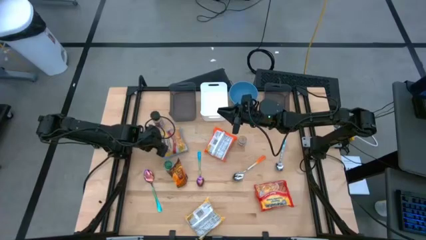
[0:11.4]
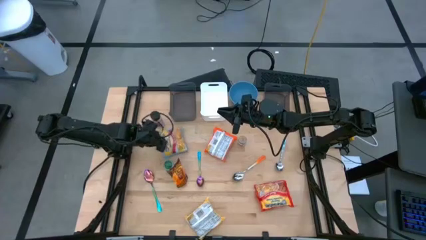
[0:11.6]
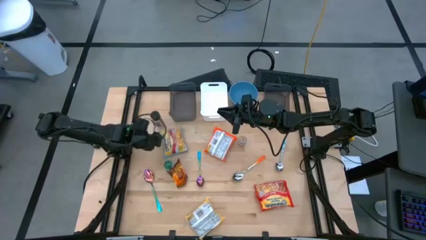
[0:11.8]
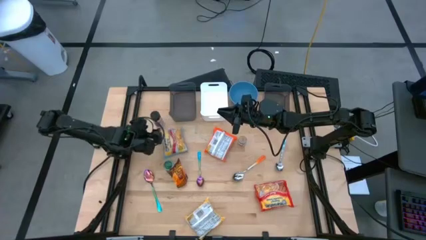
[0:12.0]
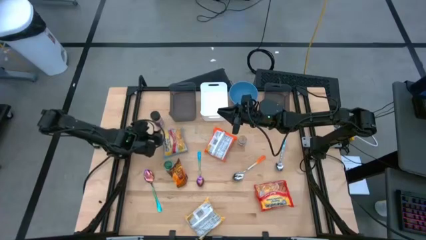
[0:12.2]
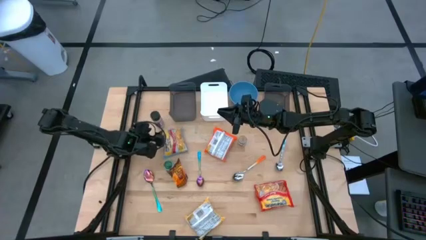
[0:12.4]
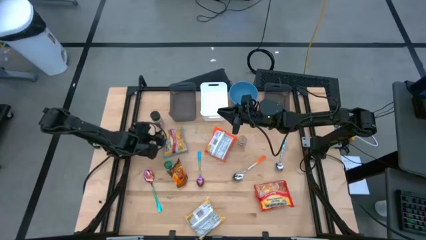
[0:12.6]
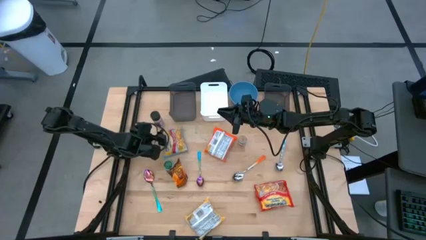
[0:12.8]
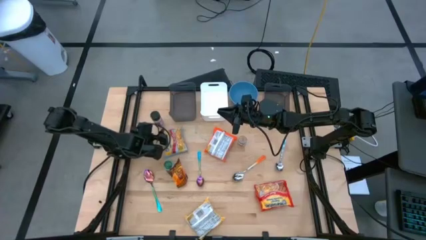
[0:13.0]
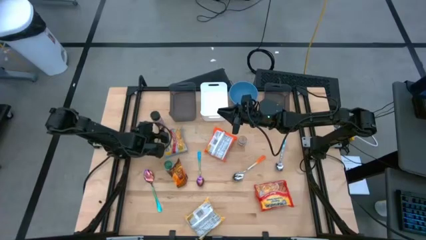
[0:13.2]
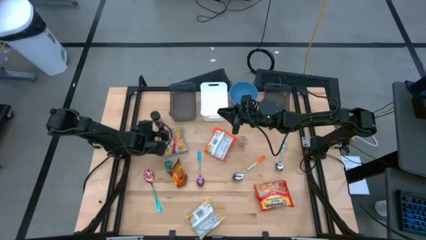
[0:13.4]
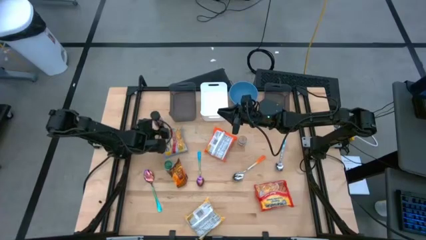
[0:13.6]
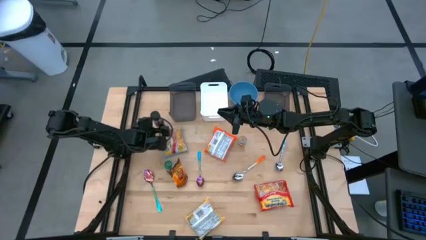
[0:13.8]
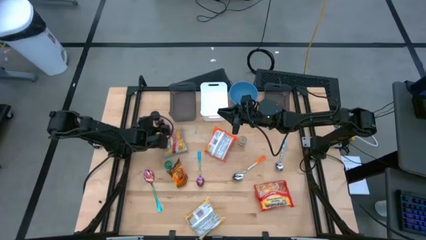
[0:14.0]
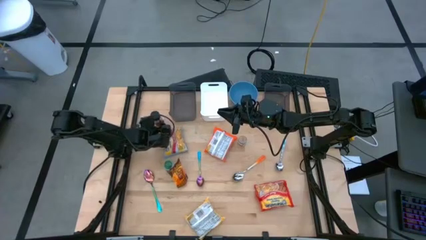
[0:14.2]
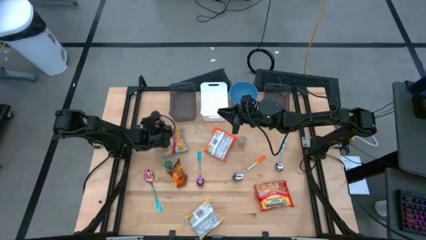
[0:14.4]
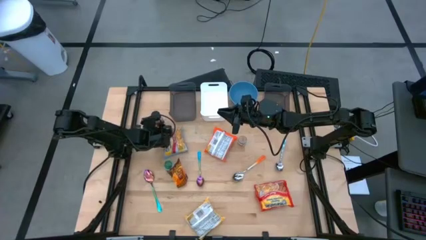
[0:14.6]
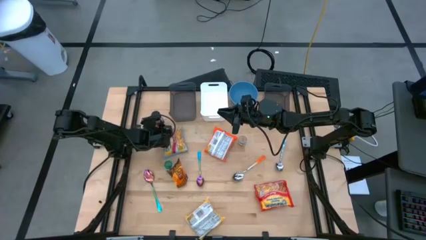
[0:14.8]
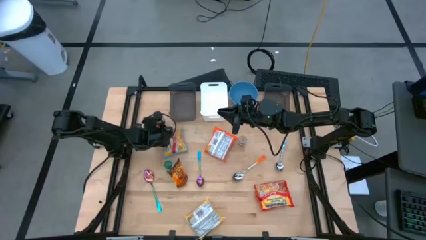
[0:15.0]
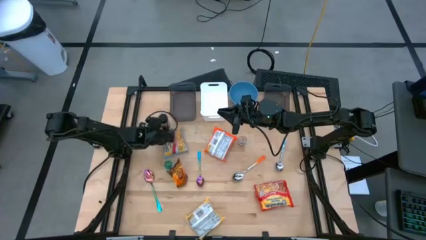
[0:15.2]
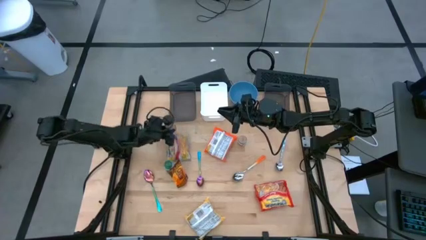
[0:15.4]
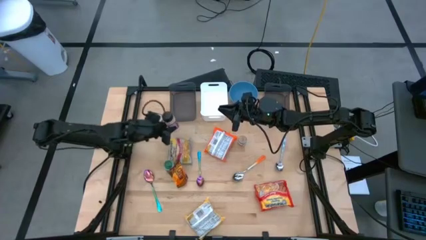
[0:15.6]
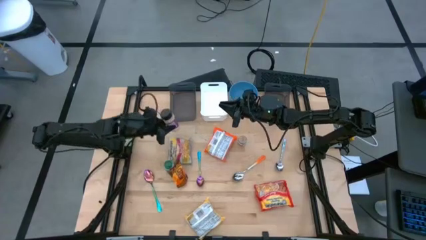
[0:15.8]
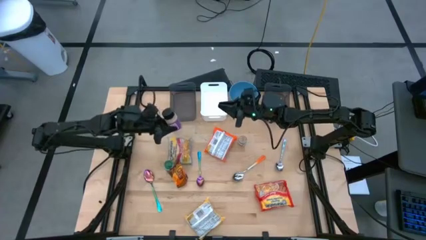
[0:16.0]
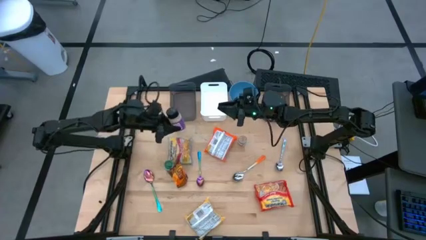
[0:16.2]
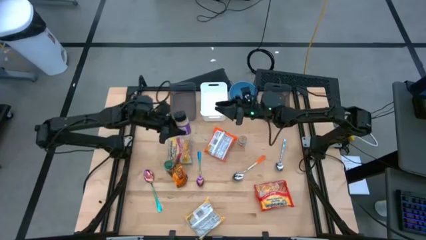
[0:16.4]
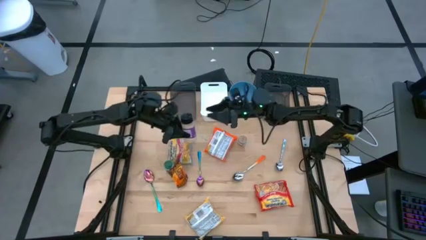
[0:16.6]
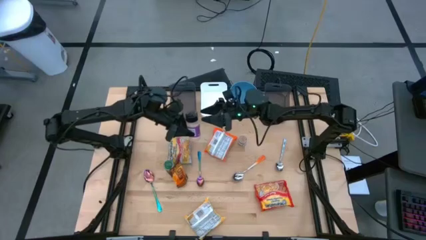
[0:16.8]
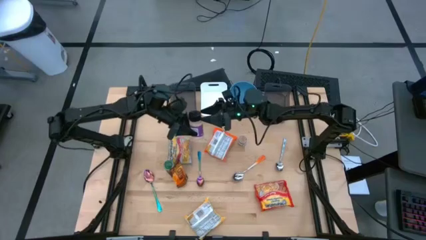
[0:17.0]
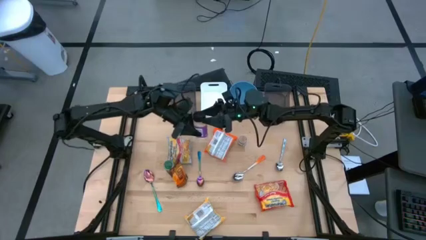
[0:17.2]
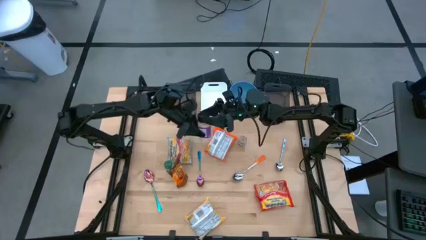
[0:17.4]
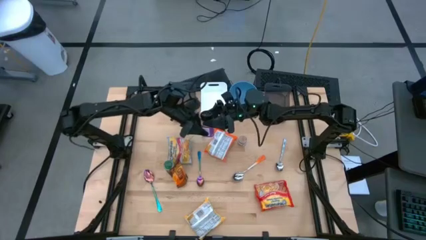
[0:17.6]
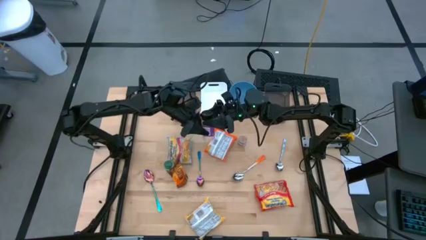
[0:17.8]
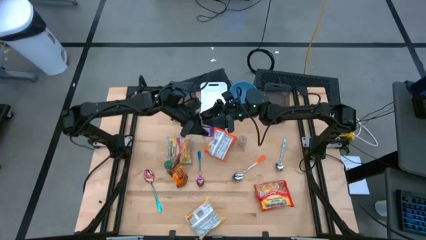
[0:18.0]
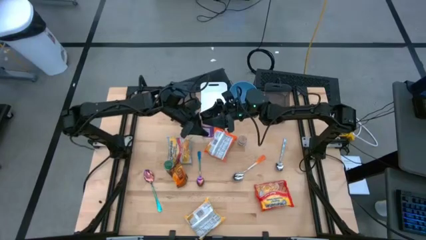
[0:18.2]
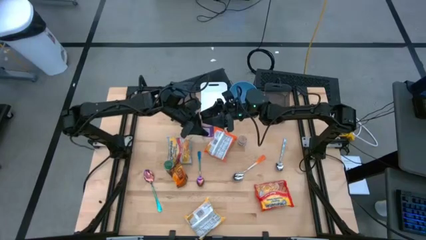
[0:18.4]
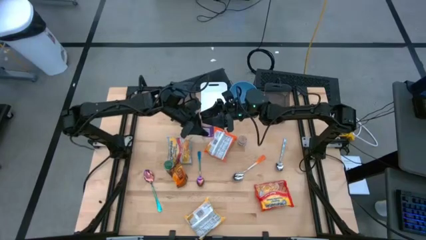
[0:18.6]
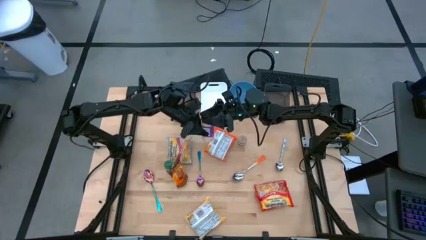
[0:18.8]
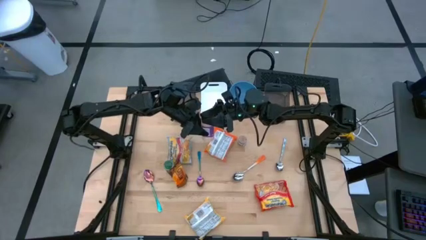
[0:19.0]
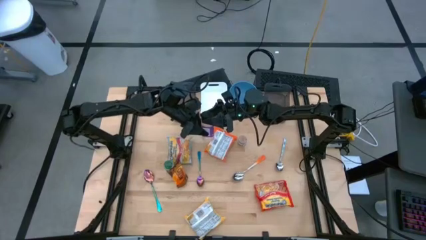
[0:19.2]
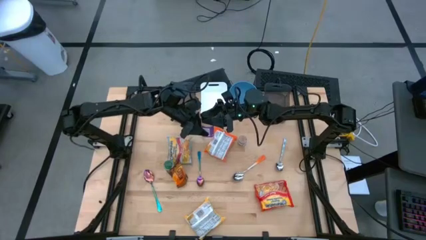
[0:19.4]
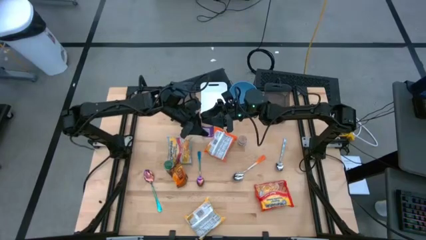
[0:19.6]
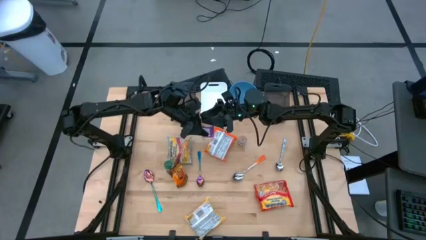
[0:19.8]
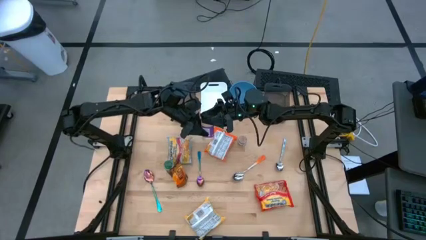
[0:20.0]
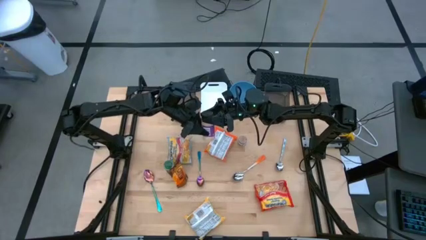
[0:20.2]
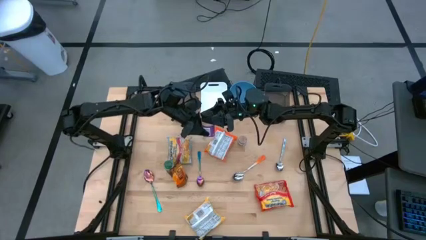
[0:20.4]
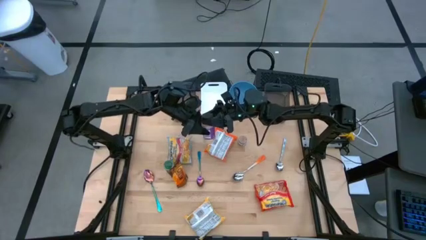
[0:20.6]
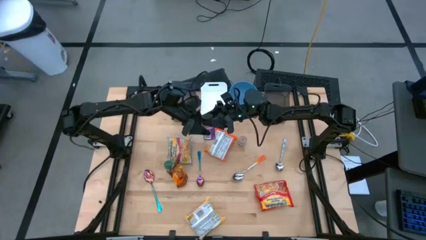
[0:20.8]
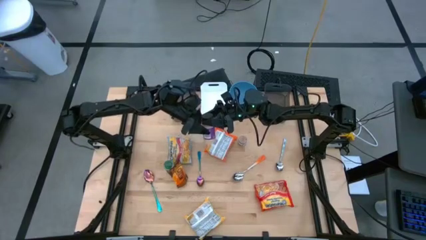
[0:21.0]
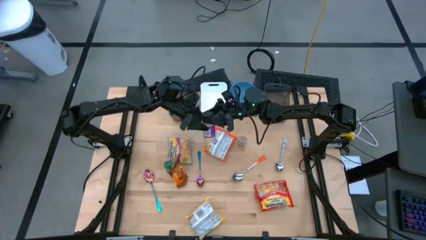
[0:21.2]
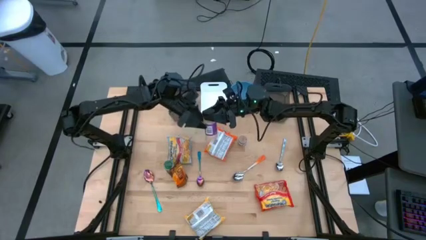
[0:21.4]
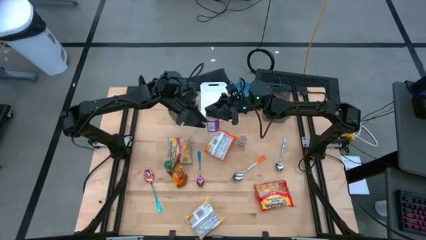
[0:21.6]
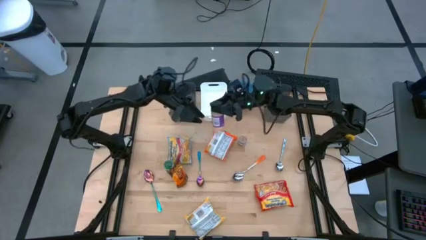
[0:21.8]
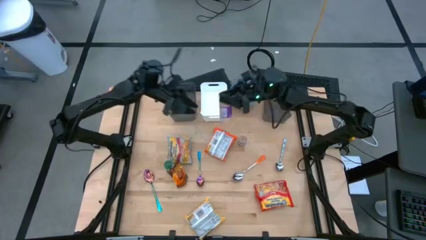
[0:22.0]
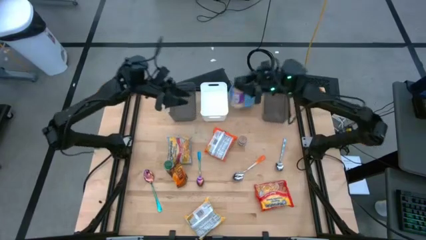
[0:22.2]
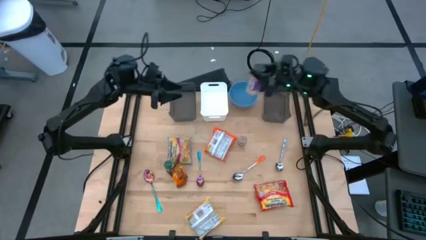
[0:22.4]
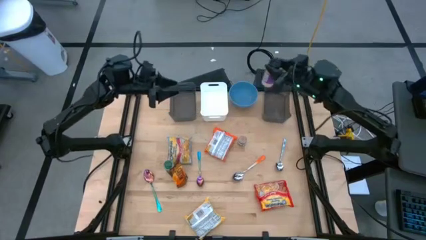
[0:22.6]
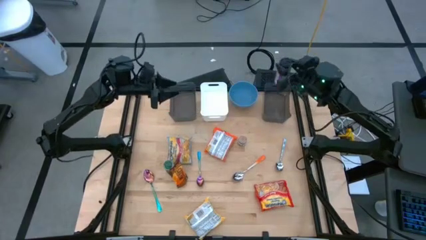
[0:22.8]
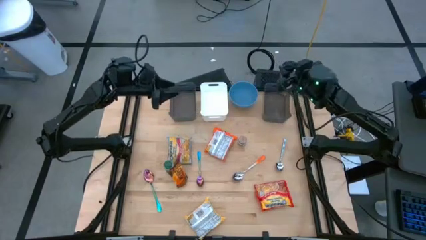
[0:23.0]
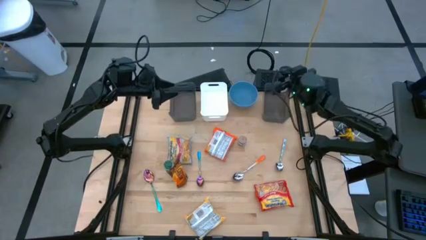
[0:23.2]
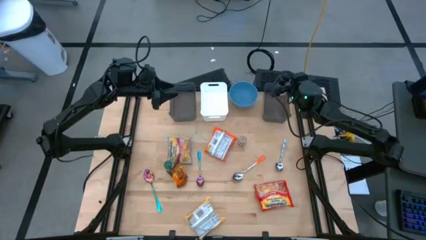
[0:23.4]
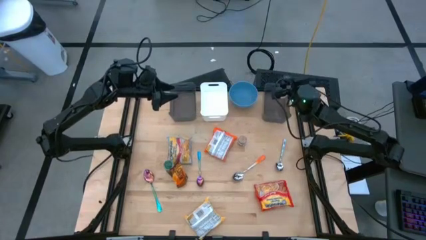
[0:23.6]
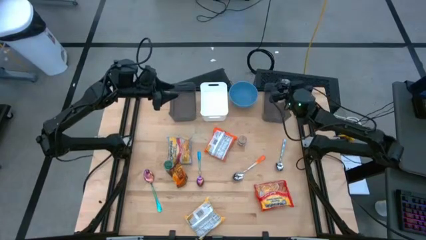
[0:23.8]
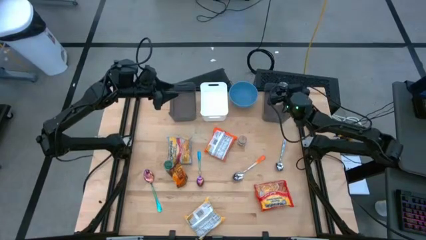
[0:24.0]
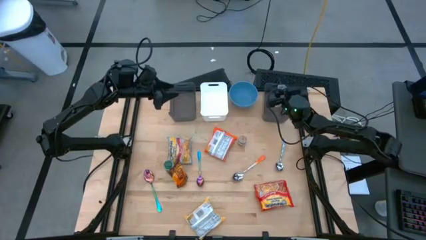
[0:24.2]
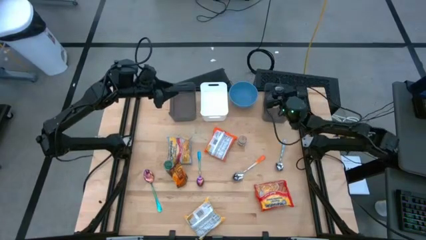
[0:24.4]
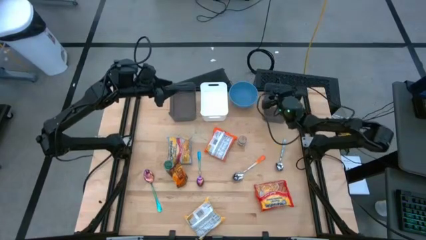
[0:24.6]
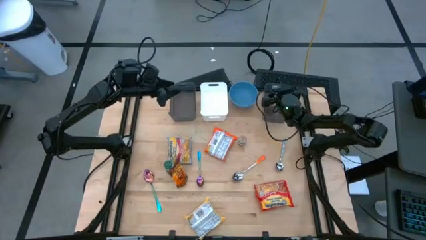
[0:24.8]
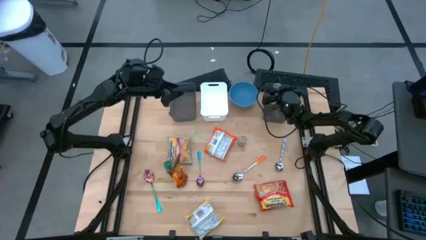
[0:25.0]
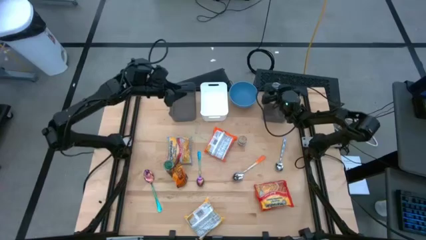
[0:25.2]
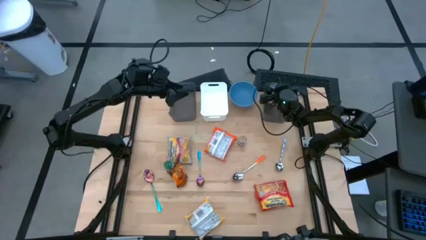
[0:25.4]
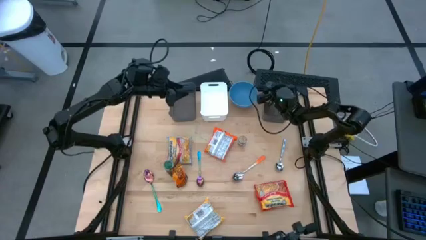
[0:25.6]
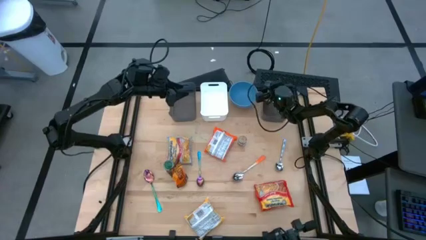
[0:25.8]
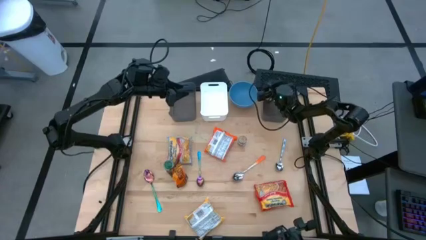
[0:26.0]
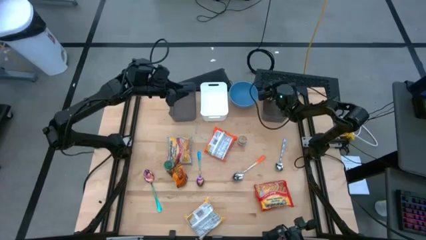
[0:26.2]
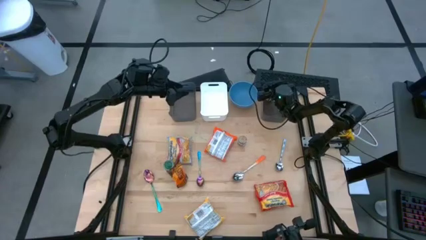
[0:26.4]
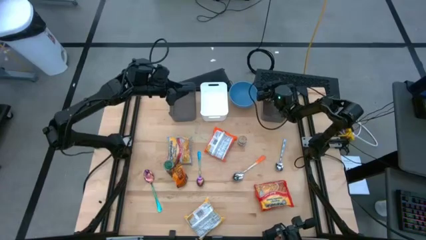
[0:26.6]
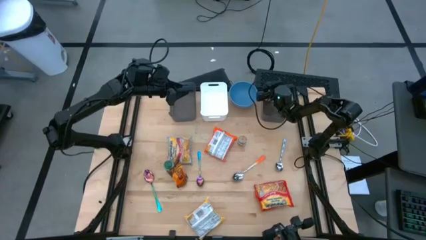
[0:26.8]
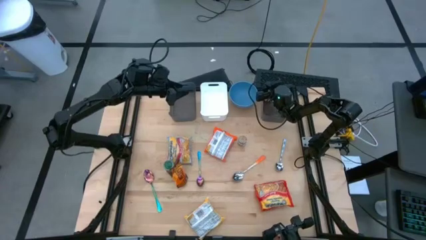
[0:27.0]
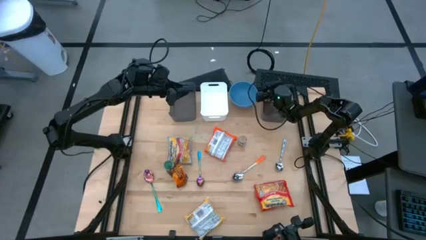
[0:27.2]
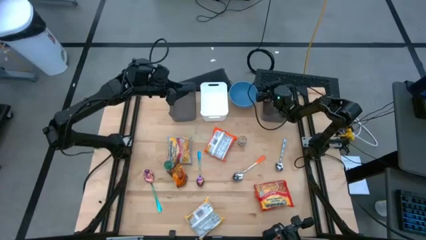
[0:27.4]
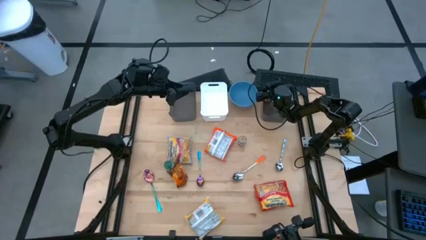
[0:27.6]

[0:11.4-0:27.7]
Task: Pick & Place Food Item
Put the black spice bottle into the right black bin
